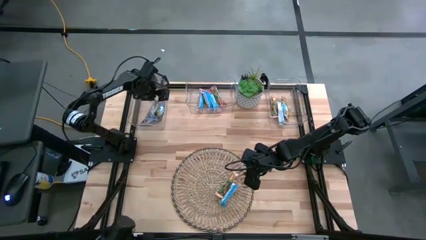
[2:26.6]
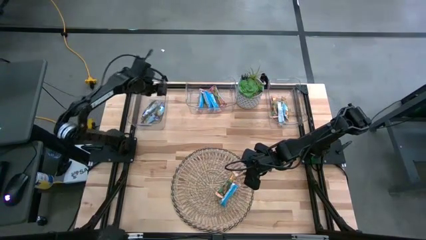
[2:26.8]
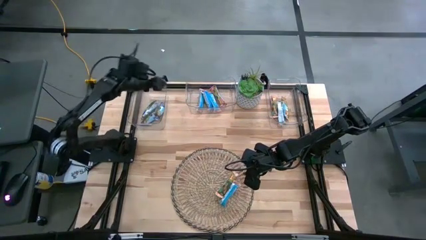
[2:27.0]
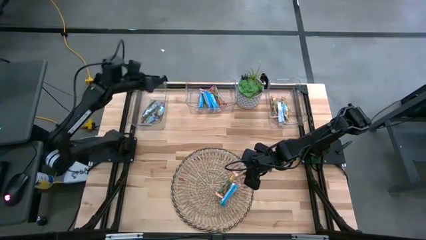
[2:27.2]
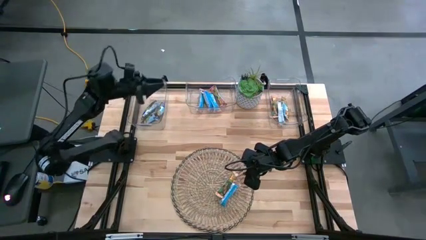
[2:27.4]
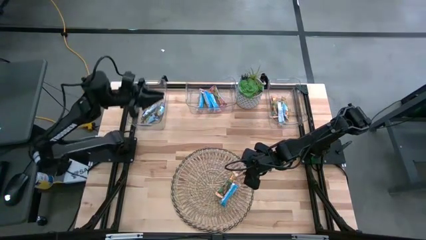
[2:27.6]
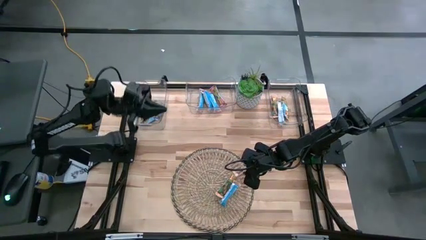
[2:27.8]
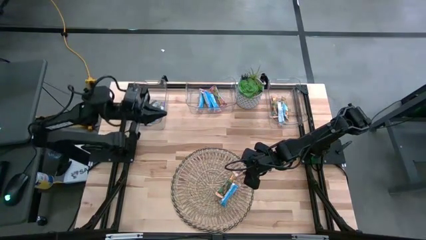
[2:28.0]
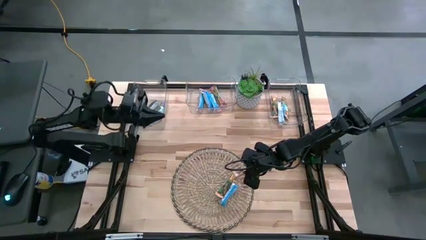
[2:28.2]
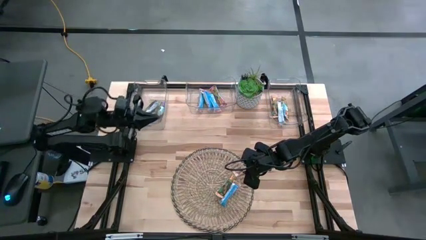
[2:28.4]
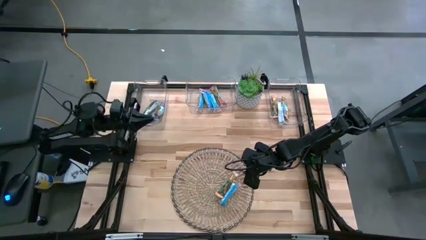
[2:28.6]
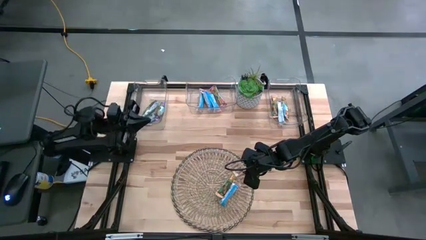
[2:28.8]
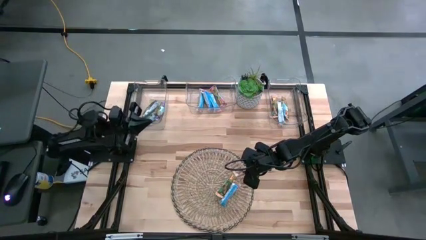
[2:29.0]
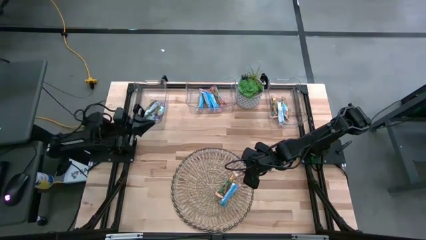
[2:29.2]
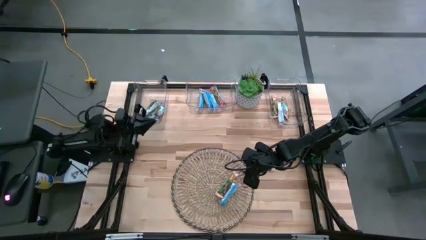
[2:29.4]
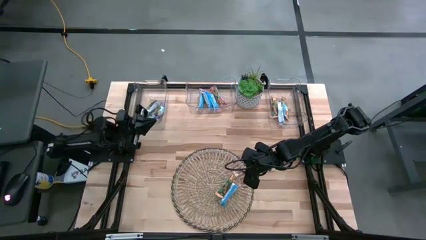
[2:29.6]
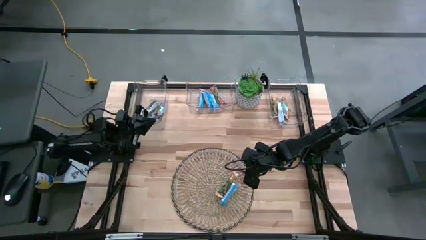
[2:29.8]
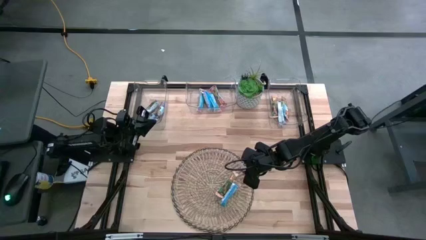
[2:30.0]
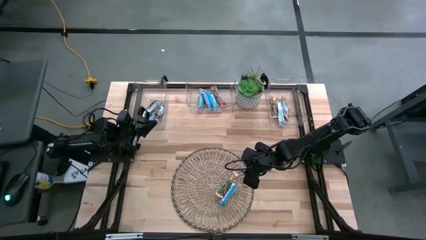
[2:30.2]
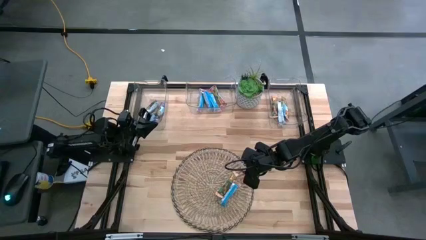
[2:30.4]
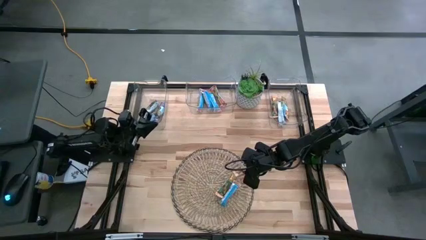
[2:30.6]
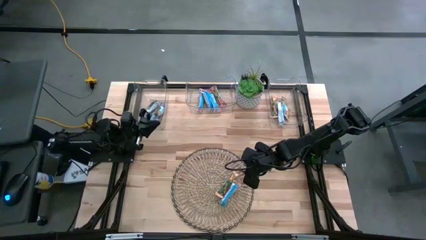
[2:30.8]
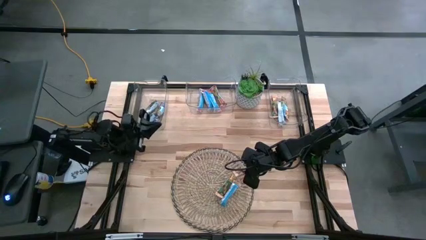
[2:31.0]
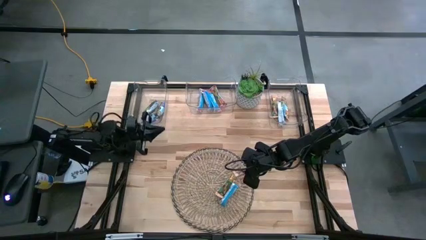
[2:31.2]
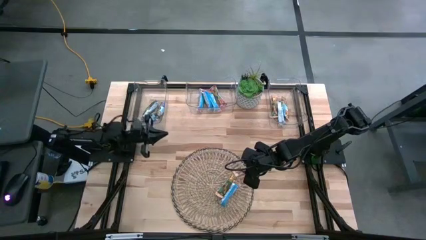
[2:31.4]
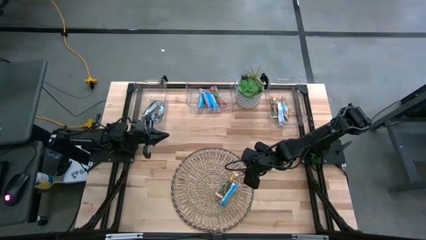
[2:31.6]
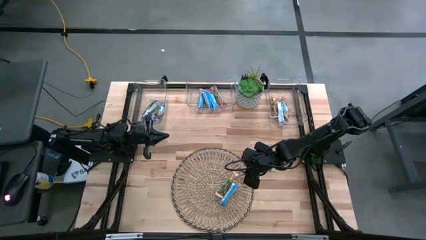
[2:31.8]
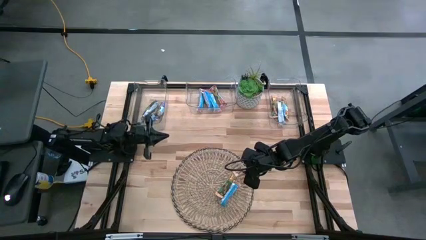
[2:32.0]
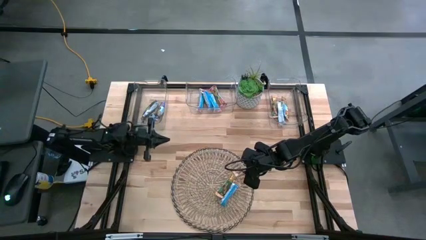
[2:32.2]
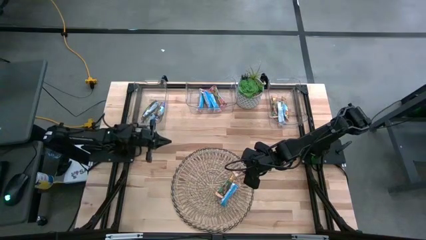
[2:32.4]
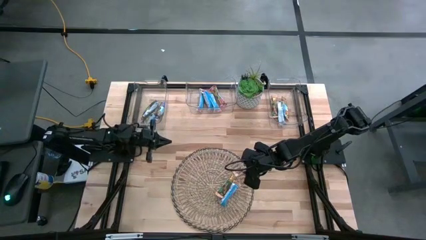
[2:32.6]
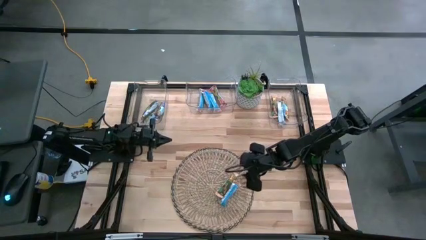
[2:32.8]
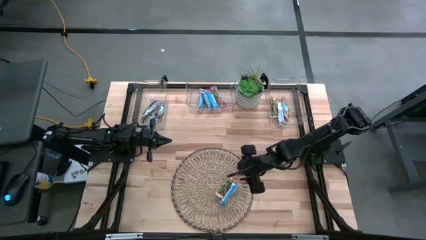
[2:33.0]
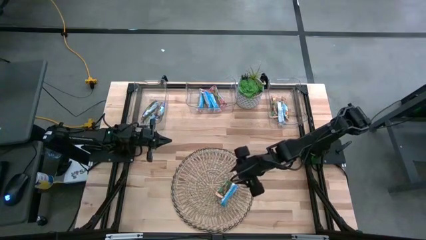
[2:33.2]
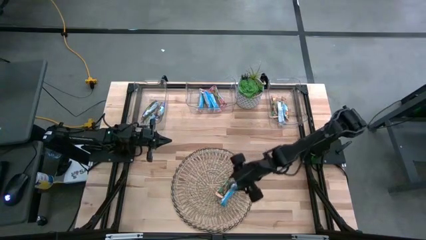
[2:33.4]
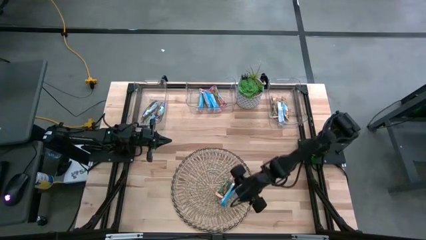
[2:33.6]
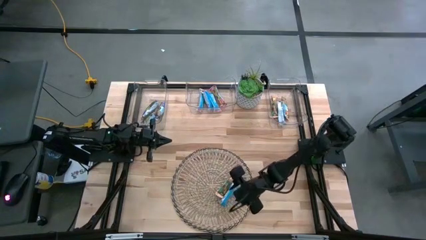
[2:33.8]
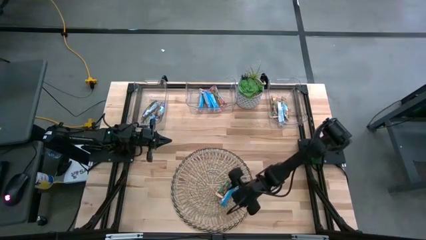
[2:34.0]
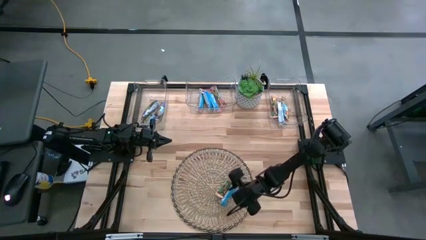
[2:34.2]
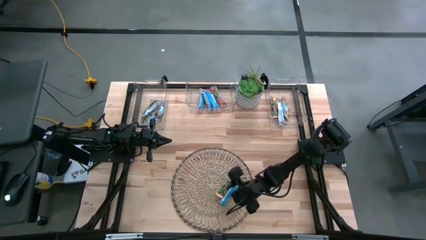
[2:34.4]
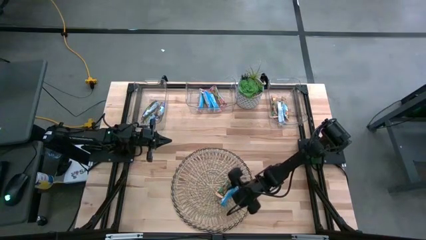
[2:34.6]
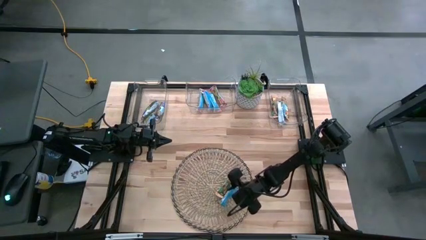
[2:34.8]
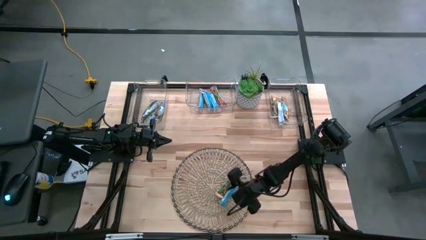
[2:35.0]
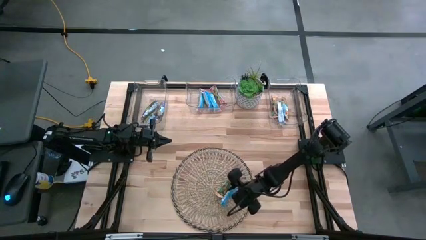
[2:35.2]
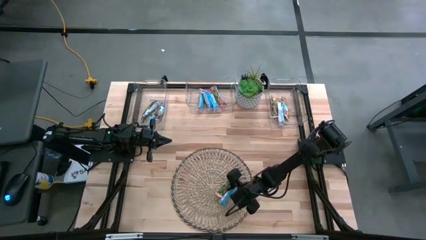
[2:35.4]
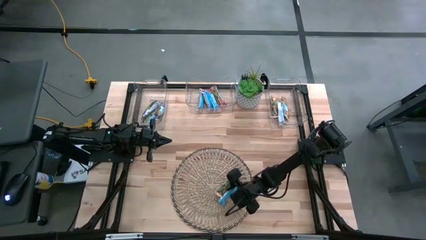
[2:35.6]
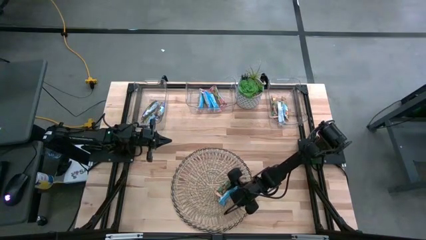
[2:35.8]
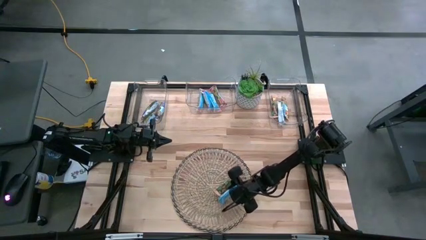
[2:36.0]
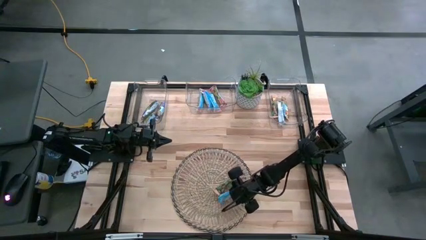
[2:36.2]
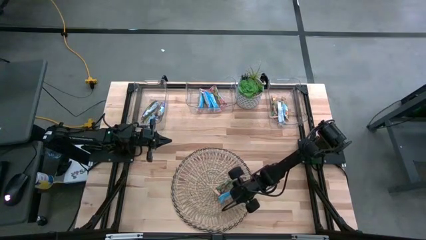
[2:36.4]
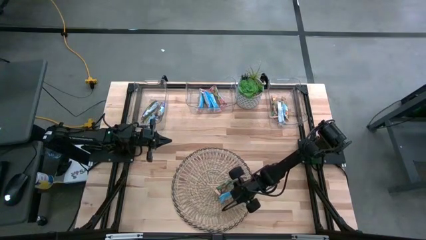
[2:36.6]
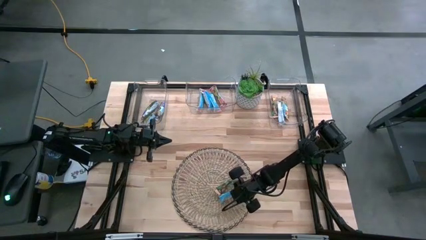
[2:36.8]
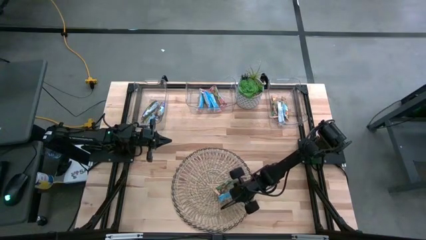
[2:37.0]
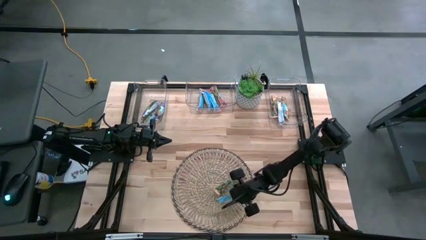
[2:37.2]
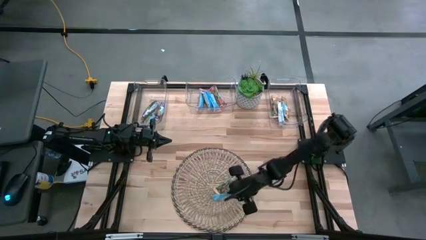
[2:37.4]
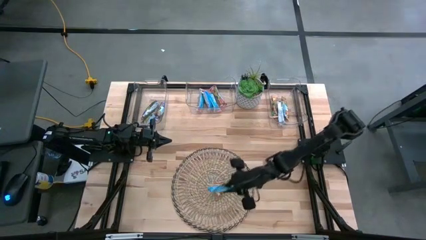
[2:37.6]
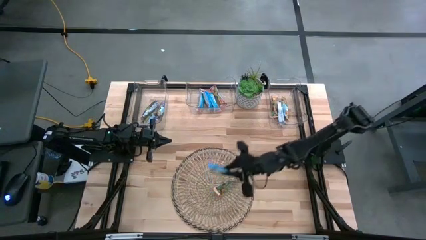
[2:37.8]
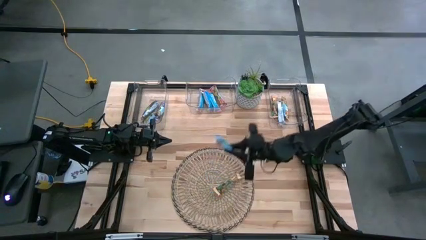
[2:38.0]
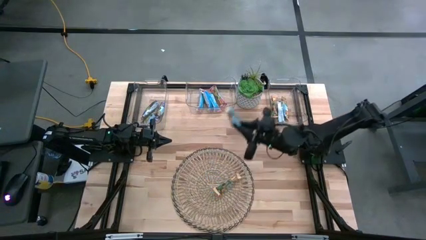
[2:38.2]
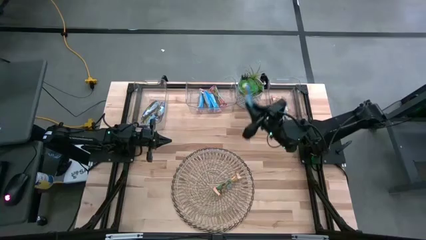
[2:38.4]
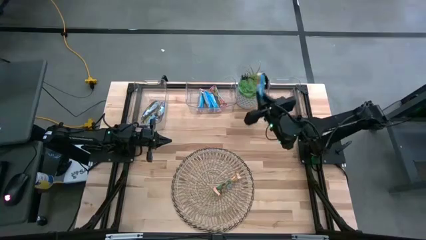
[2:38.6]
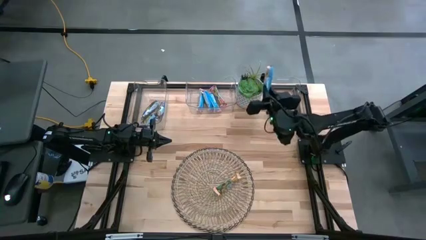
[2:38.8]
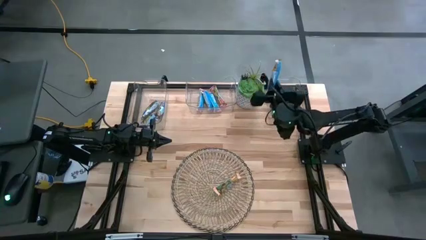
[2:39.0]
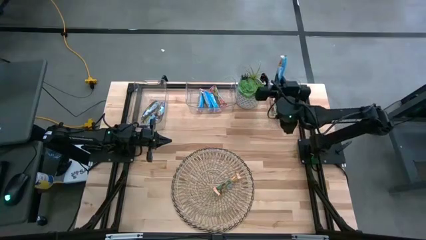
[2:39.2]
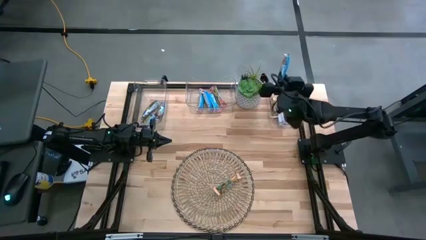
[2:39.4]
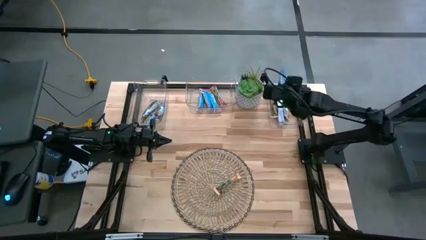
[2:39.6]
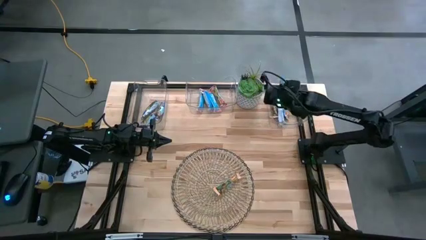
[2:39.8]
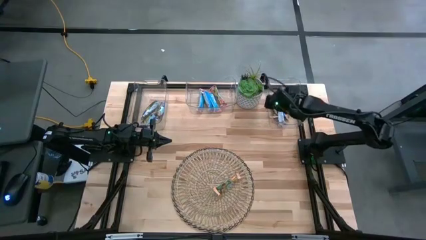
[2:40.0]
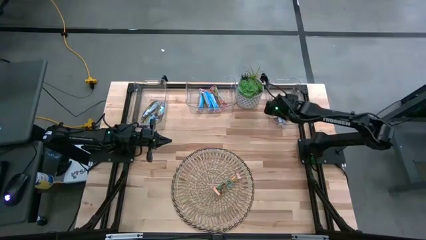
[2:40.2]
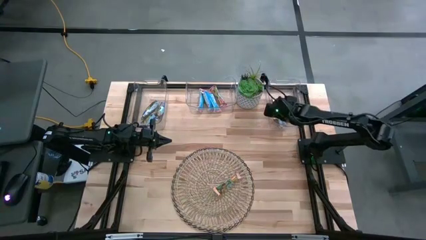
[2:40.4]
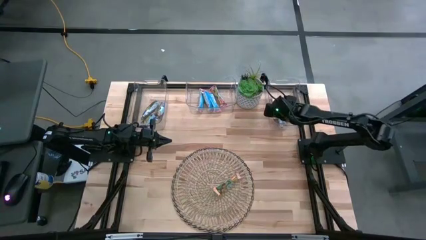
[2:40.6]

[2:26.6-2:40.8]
Task: Pick and place Granola Bars by type
Put the yellow granola bar into the right transparent bin
